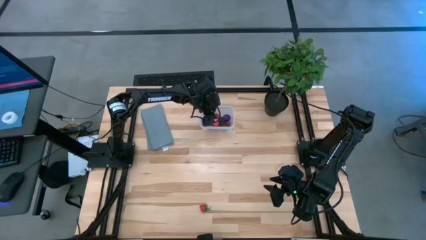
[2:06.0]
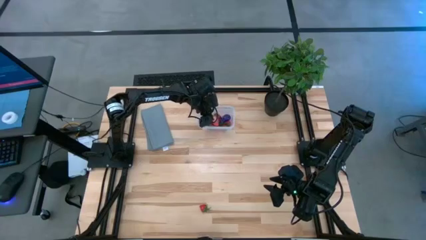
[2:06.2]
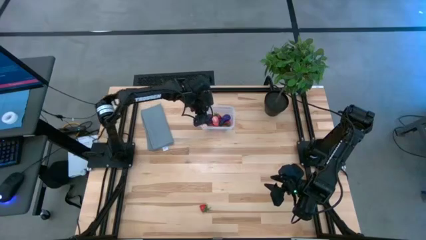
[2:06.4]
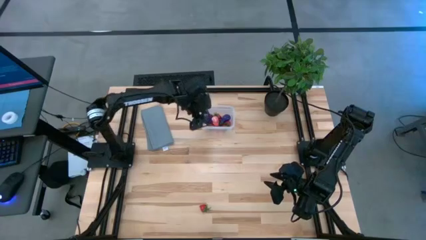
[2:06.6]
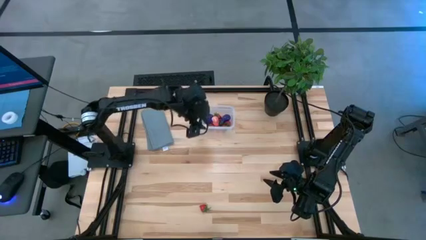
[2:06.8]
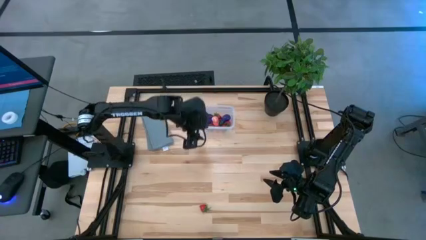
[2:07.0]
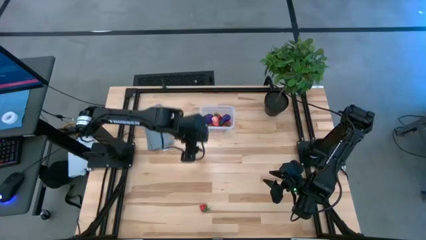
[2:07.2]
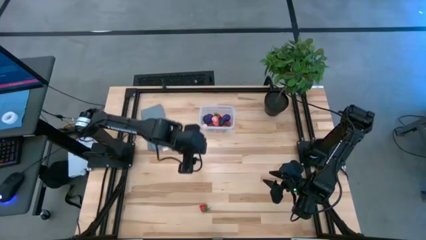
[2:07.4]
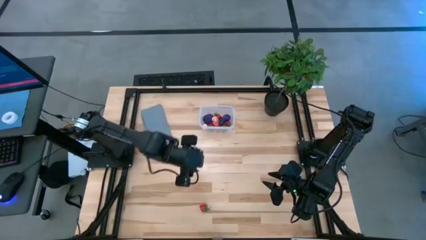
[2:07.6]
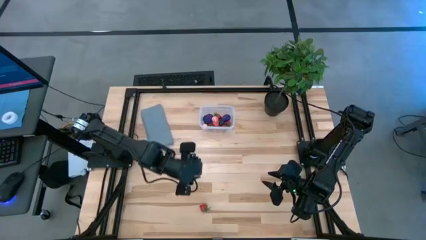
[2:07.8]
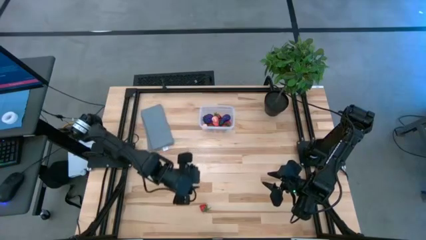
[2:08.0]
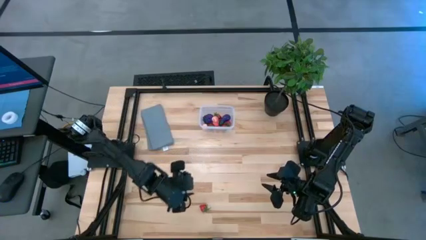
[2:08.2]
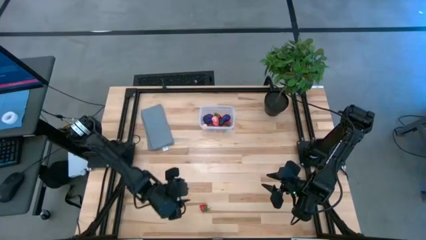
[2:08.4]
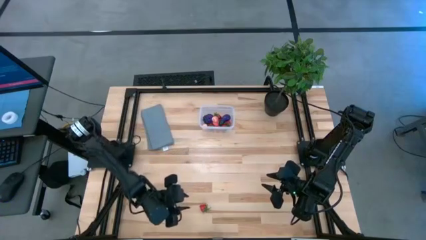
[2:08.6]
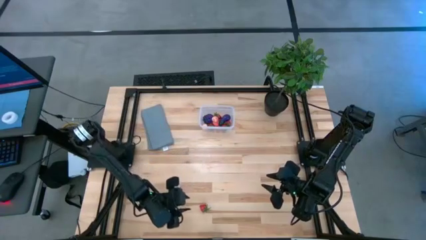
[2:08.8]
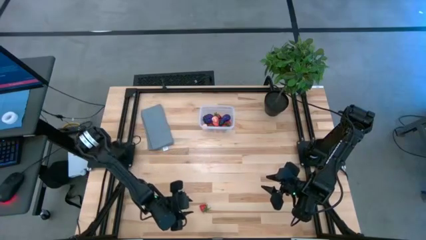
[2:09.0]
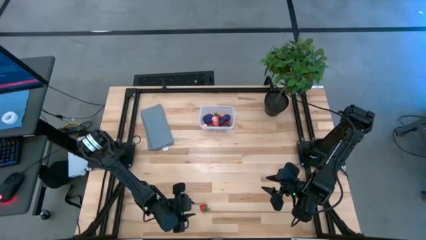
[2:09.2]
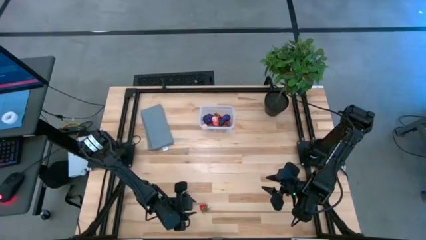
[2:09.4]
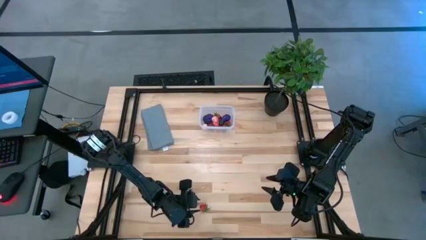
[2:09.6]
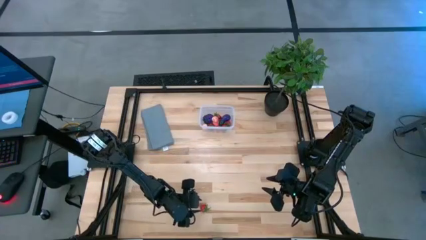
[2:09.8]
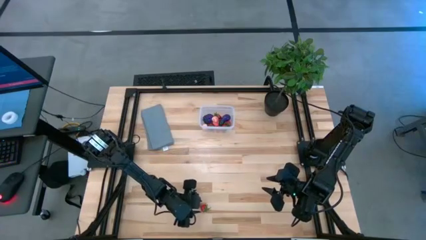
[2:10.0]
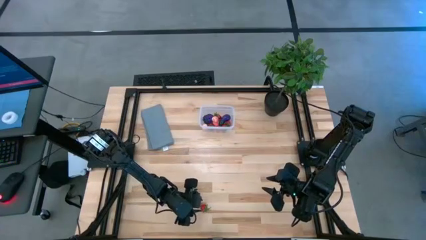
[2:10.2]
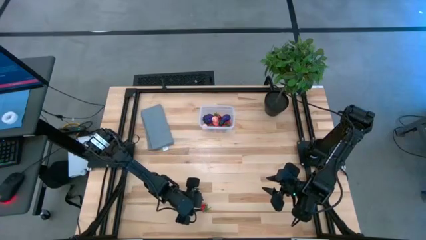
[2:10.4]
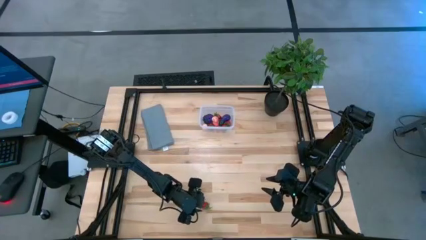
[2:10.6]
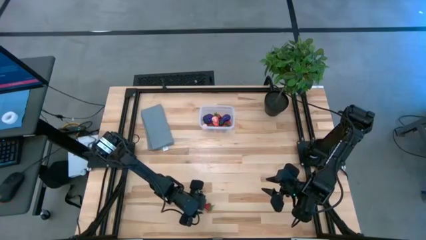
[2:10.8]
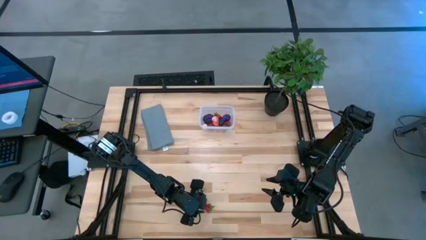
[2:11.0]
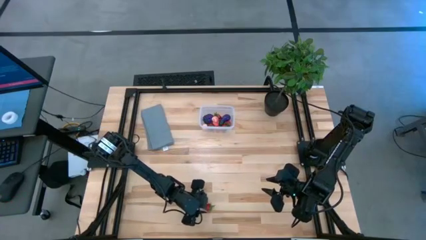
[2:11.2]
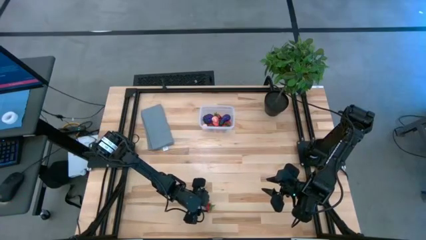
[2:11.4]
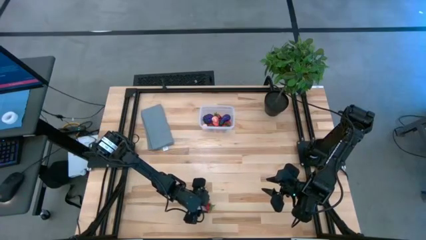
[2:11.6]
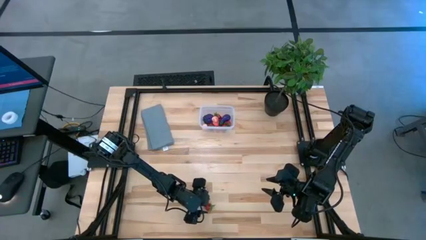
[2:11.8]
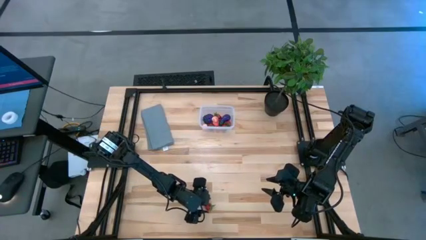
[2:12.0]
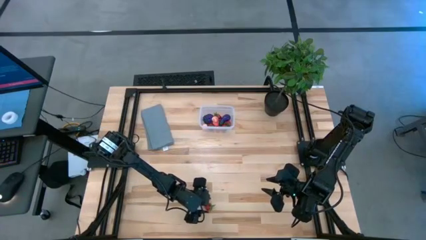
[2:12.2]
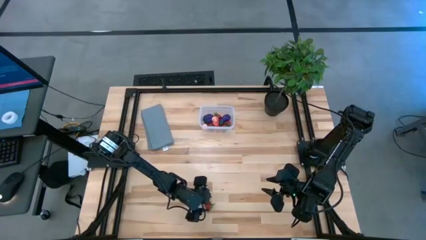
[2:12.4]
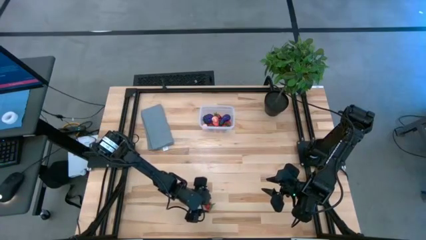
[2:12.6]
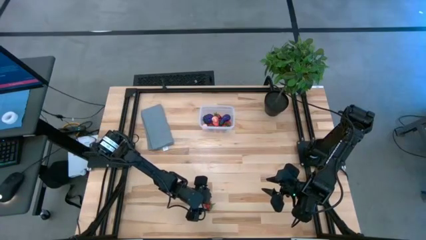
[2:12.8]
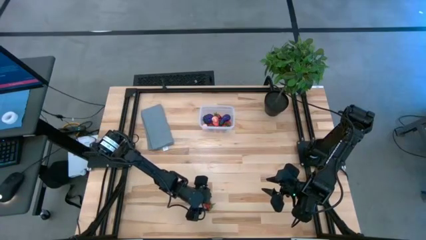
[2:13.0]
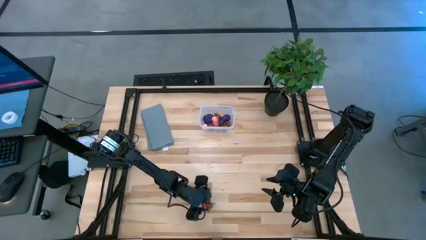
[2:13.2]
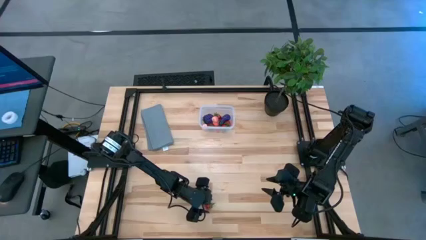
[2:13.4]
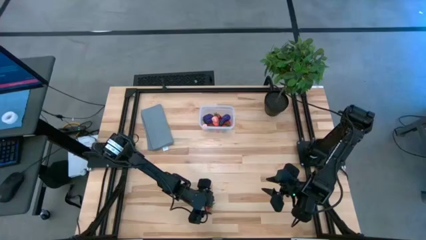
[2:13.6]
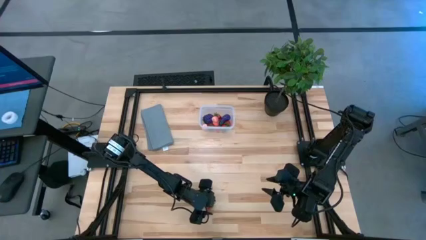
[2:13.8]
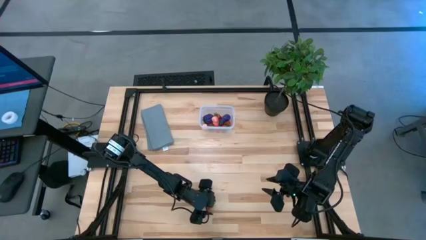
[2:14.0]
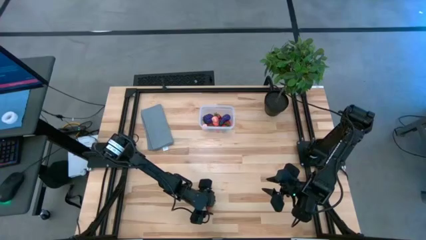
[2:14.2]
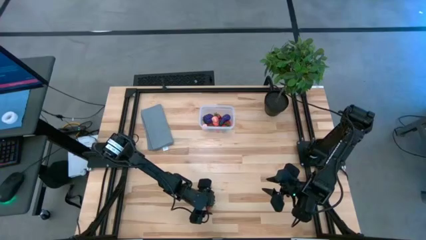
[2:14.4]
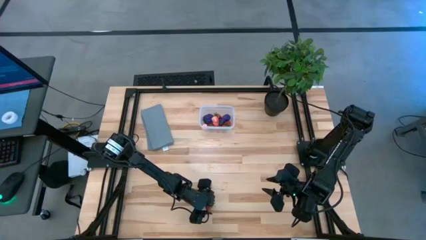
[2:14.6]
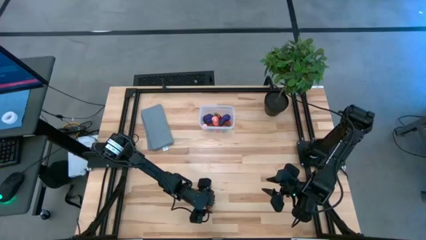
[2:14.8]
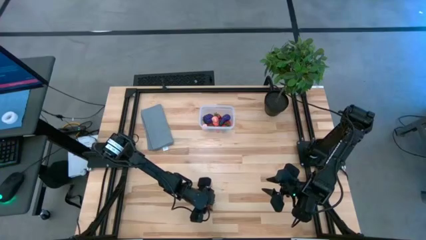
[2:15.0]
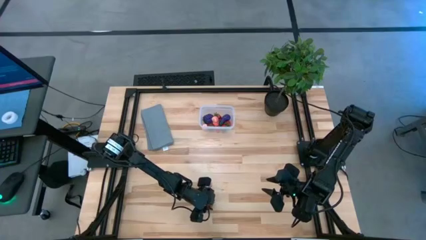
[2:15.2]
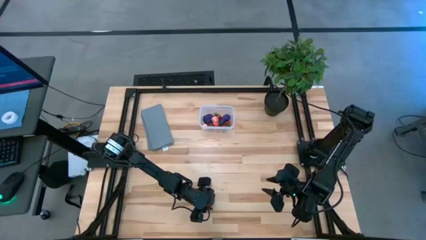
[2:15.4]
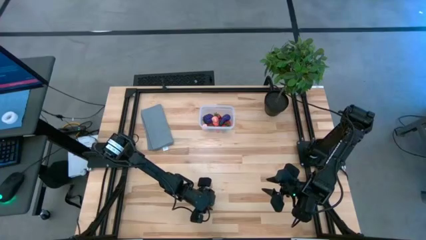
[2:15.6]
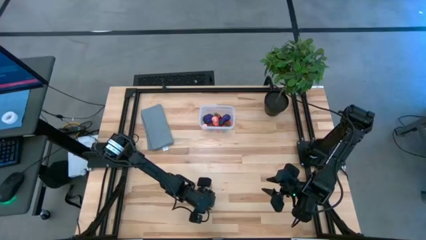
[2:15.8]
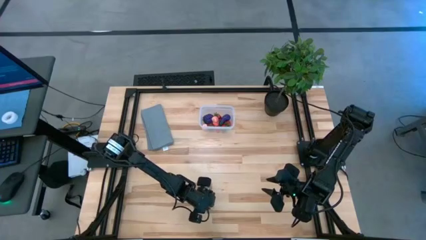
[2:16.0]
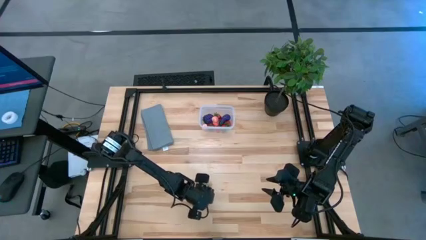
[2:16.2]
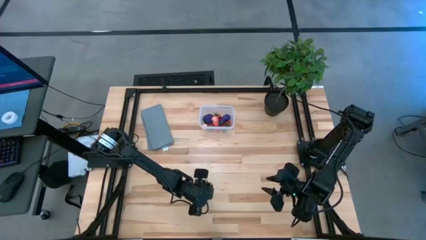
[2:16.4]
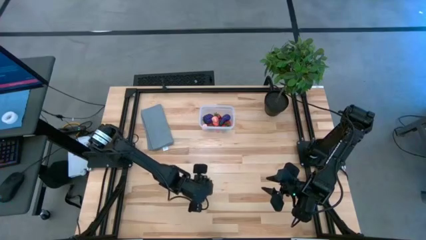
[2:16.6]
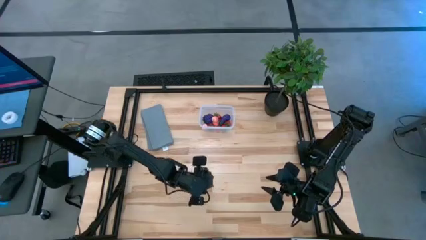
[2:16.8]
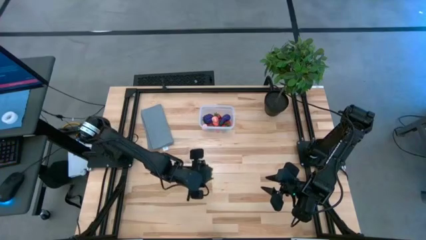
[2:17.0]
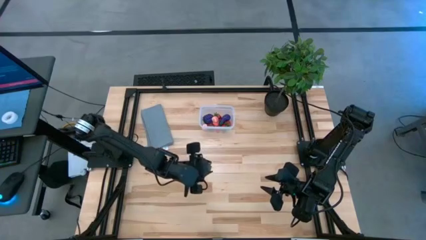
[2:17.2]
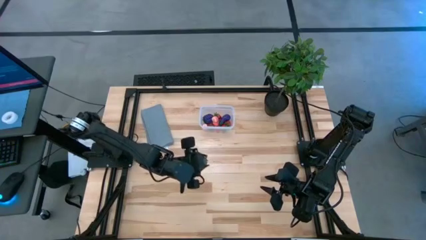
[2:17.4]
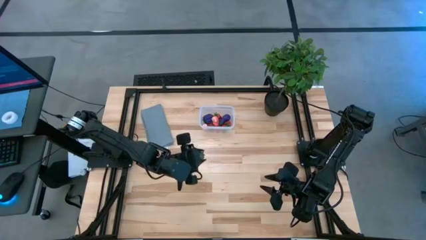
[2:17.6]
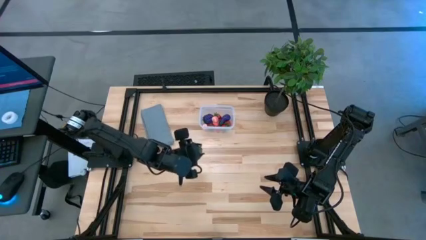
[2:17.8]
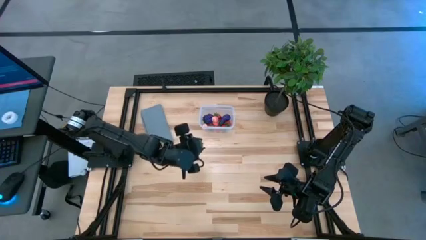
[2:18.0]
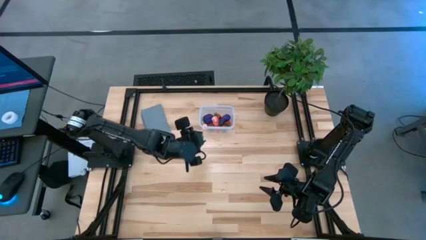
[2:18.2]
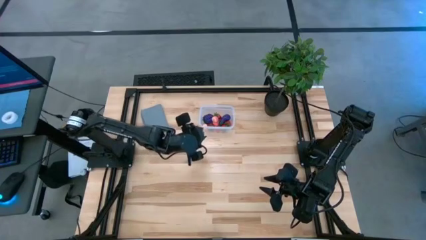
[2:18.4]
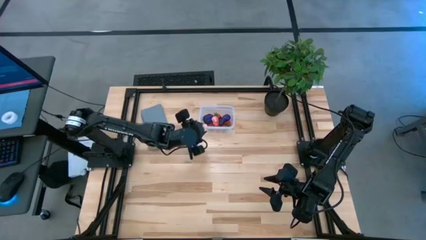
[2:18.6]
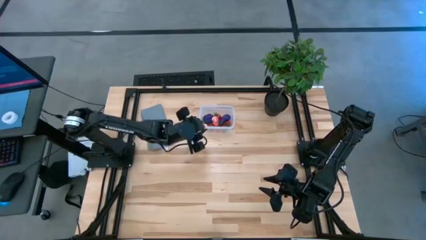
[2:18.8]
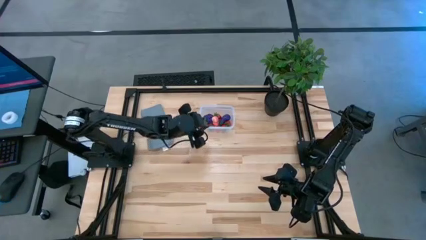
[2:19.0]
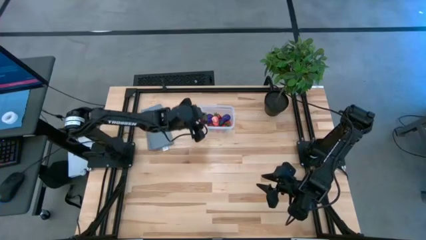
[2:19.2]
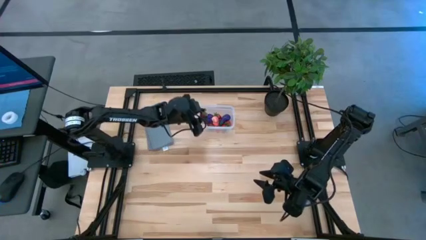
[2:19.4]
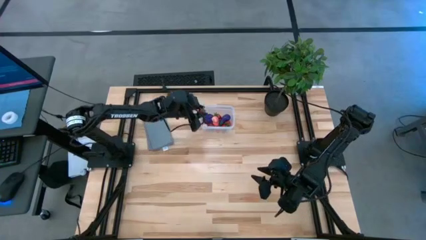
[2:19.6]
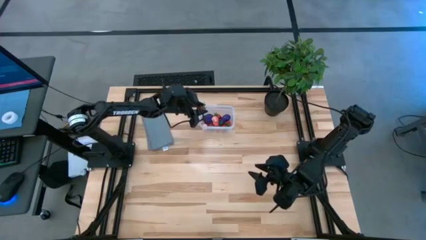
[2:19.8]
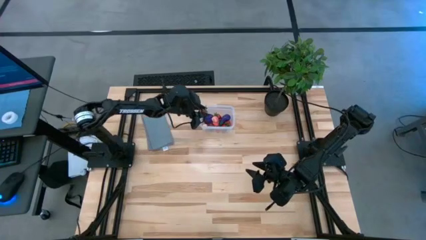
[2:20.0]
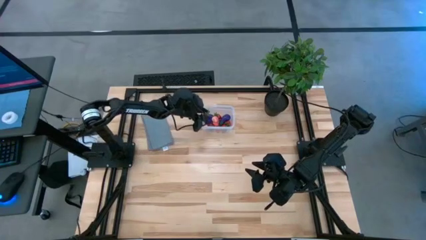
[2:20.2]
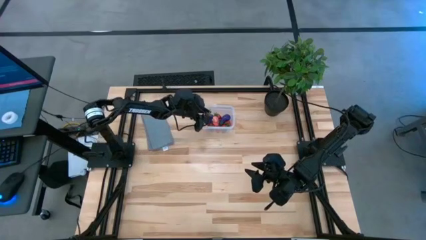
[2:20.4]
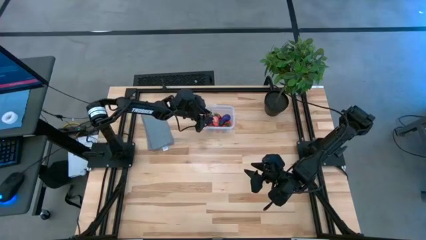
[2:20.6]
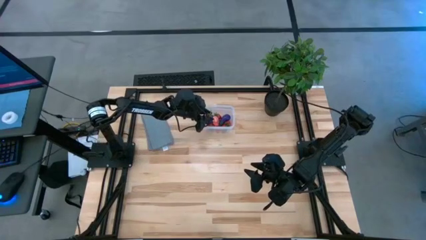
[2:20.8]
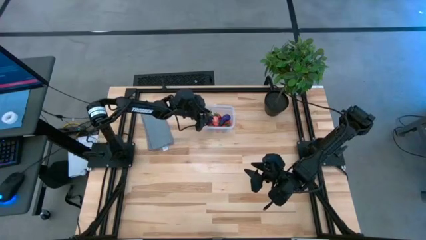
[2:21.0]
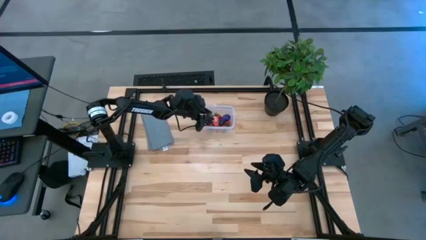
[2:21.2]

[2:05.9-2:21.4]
Task: Pick and placing Produce into tupperware
Put the strawberry into the transparent bin

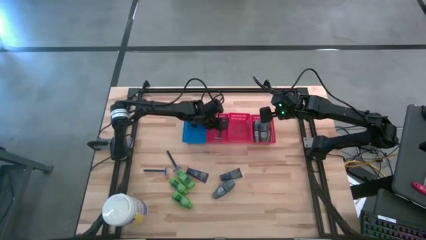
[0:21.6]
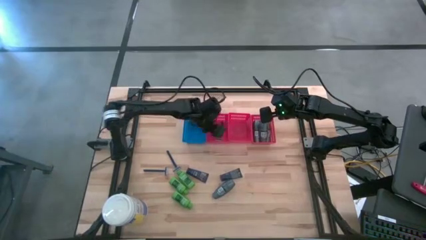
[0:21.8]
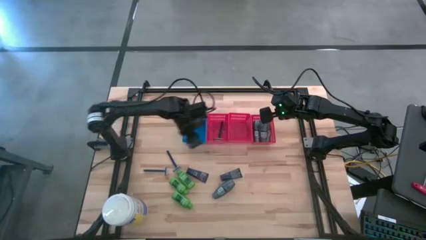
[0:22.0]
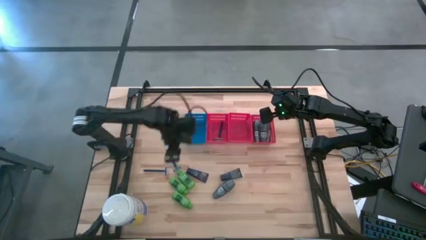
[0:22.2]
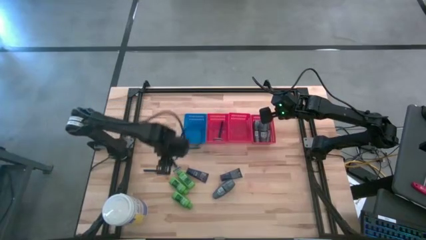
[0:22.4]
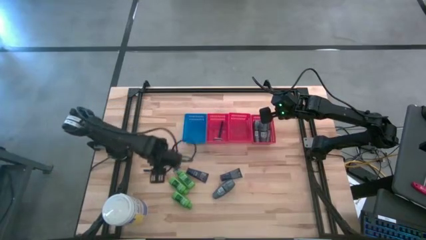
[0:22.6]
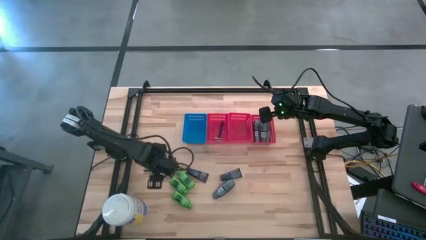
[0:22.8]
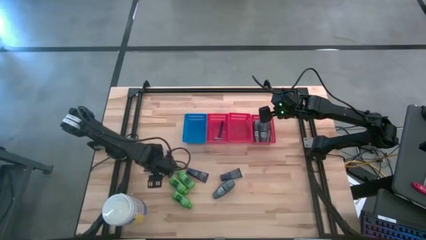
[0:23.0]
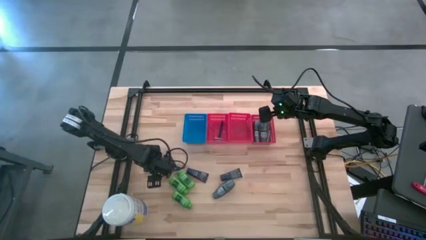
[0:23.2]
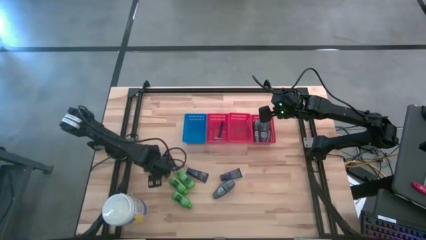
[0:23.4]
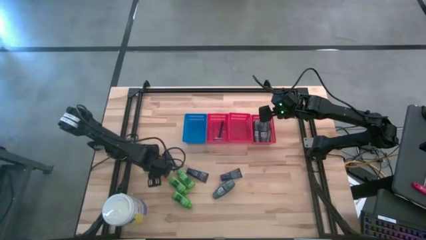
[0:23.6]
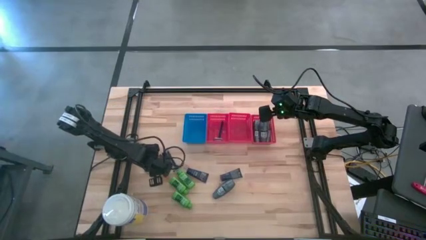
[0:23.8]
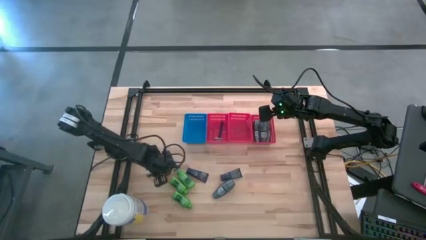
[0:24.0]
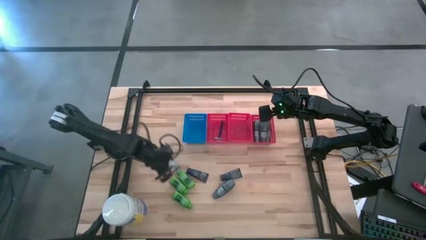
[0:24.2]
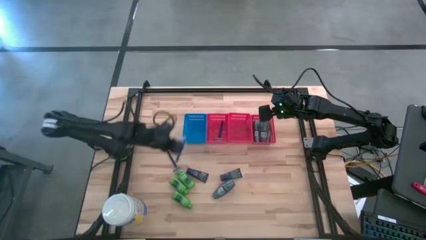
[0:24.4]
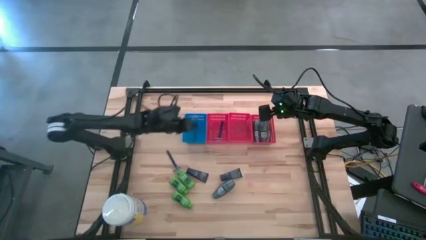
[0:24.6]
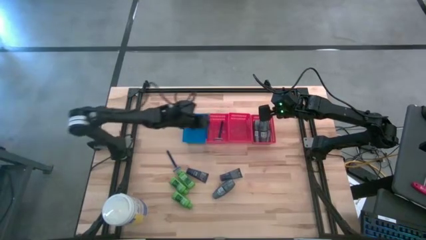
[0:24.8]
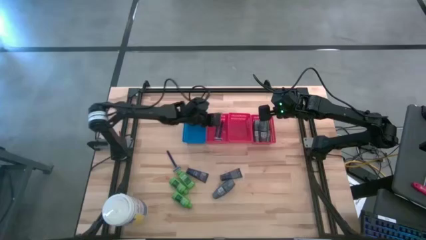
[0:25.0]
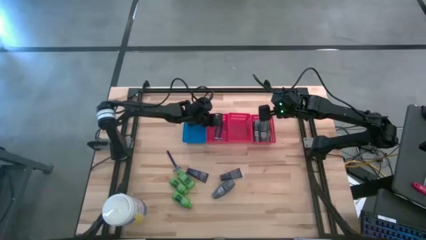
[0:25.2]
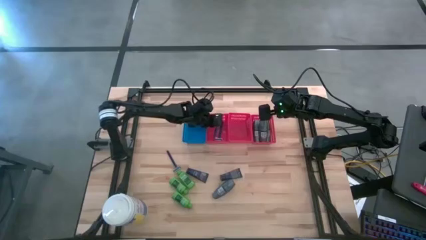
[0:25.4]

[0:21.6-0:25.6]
Task: Pick & Place Travel size toiletries
Put the blue razor into the left red bin
